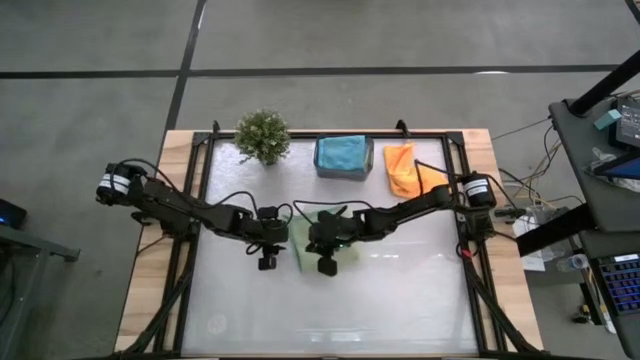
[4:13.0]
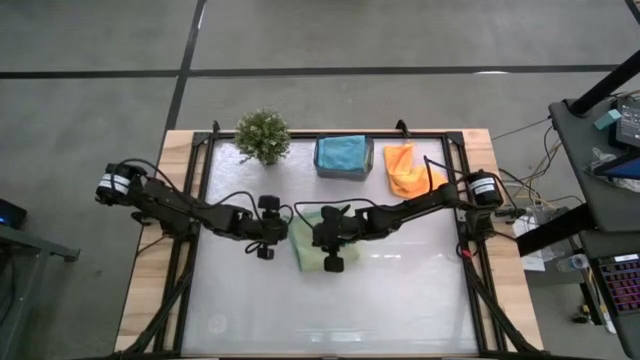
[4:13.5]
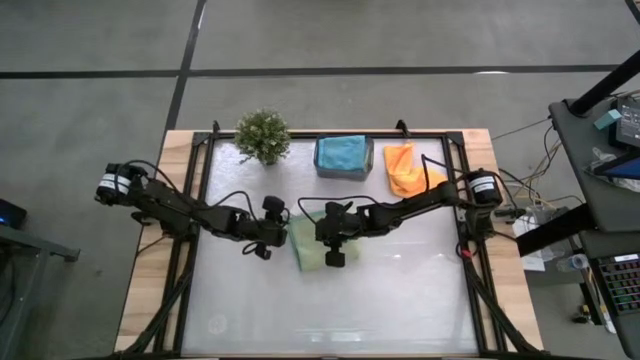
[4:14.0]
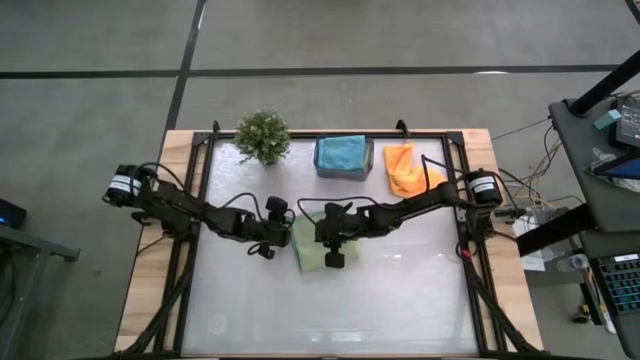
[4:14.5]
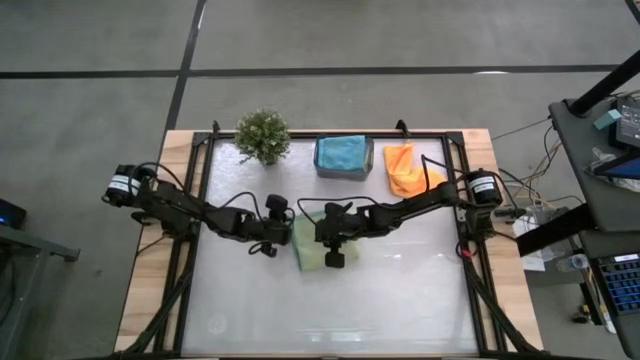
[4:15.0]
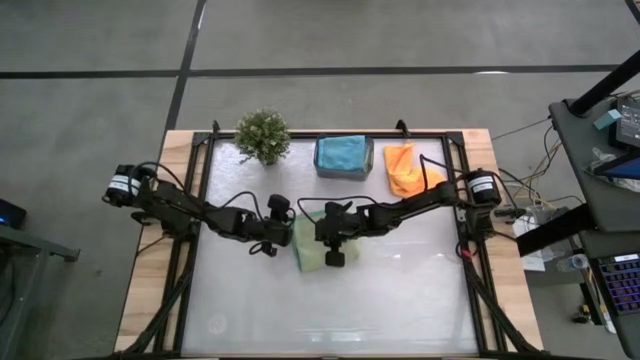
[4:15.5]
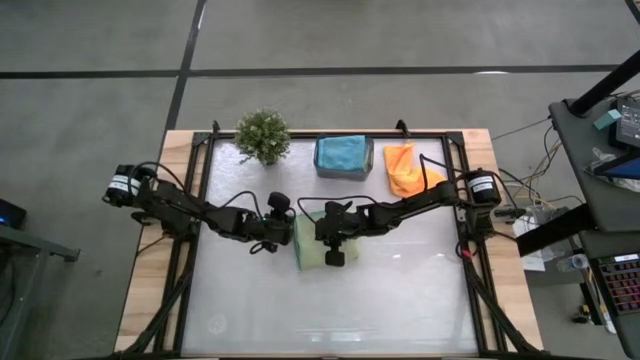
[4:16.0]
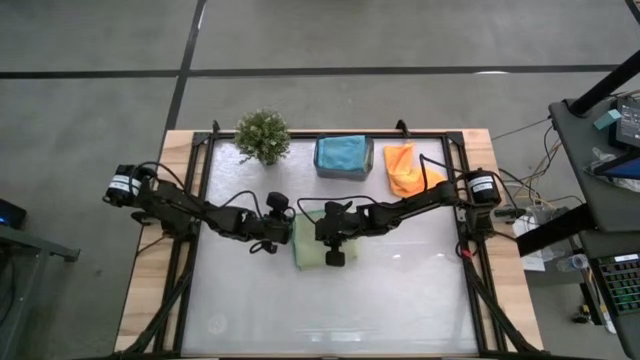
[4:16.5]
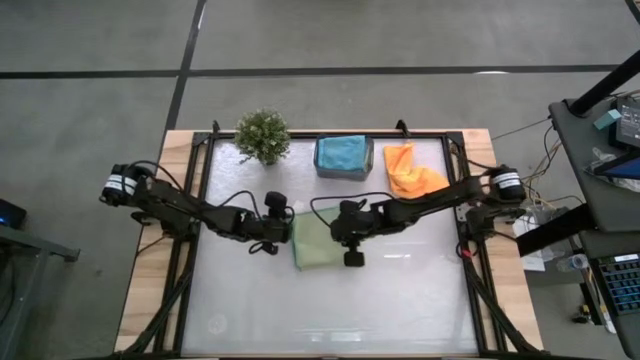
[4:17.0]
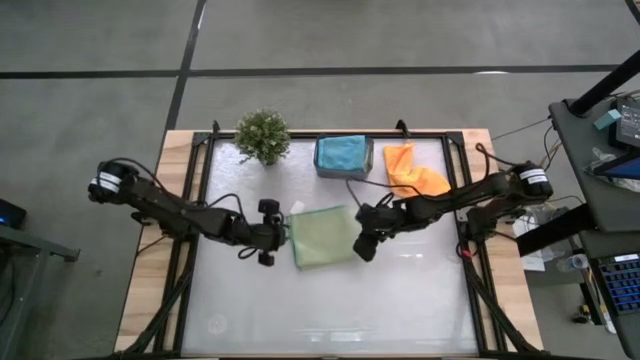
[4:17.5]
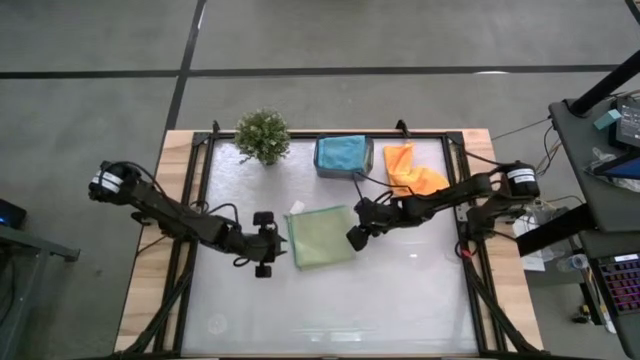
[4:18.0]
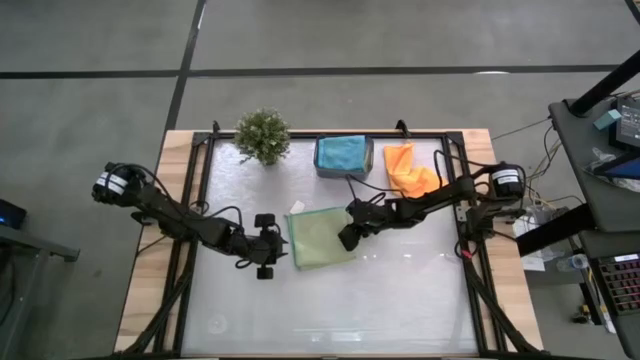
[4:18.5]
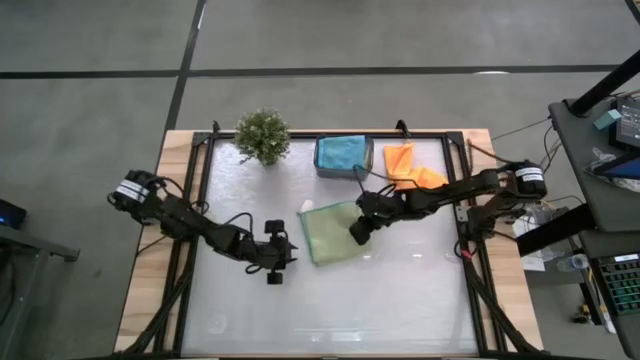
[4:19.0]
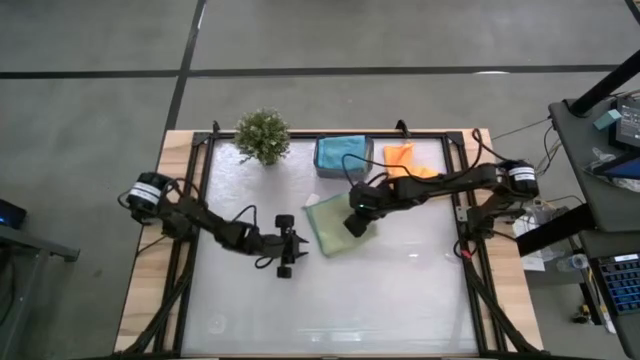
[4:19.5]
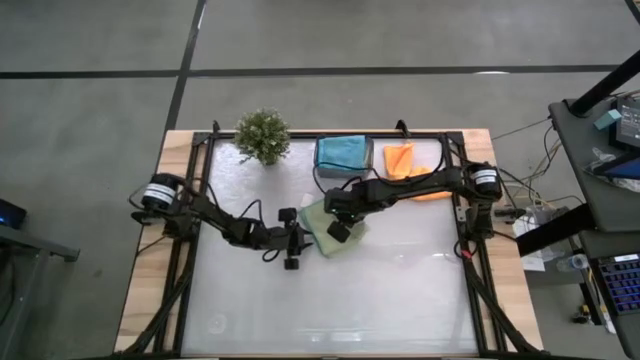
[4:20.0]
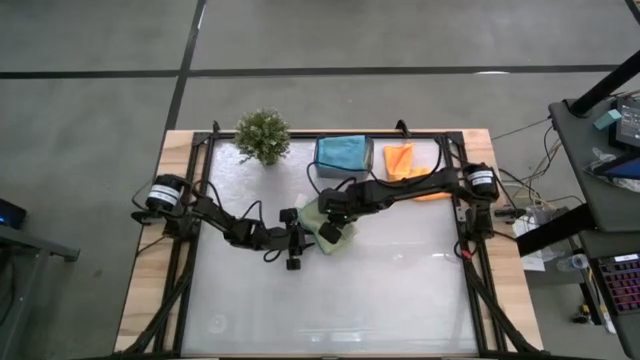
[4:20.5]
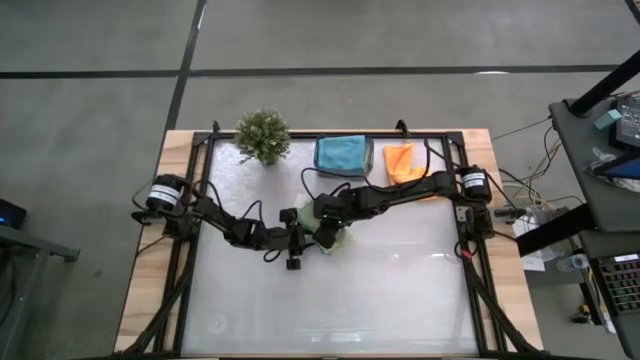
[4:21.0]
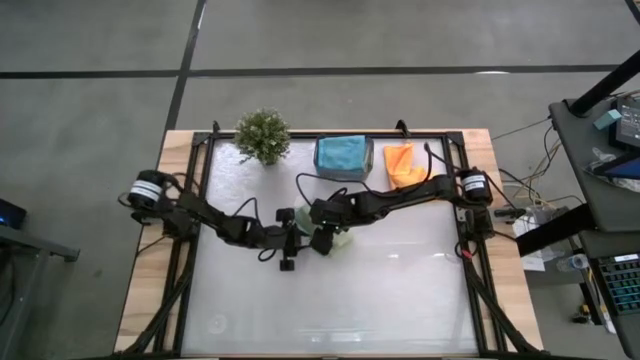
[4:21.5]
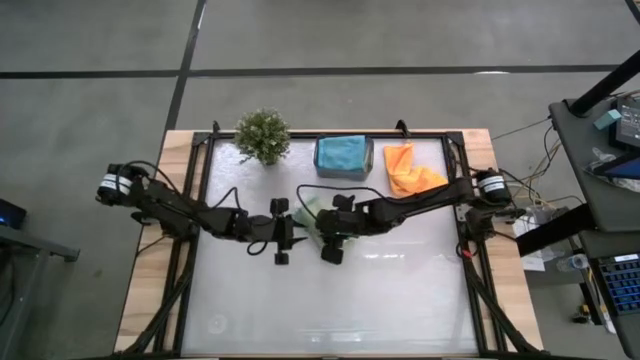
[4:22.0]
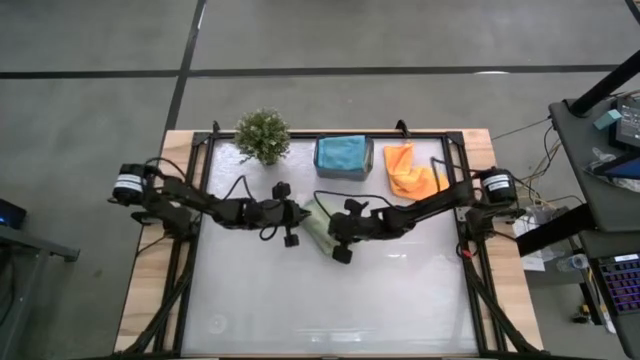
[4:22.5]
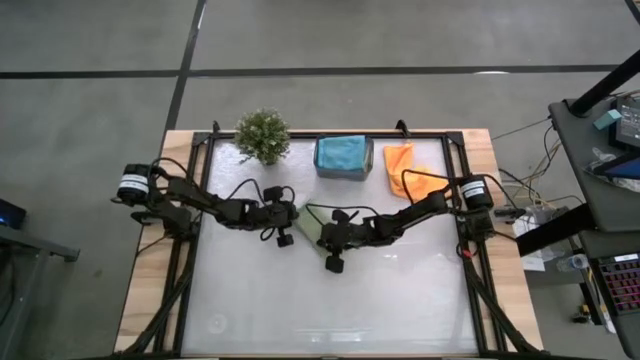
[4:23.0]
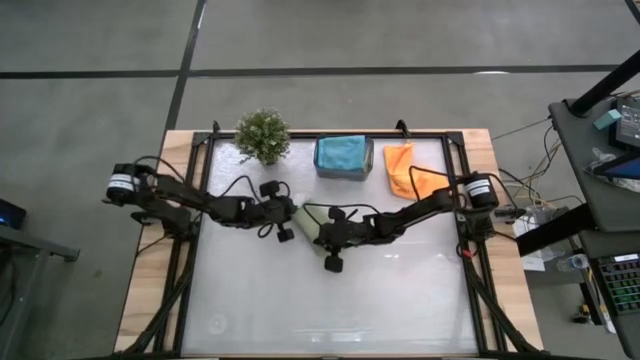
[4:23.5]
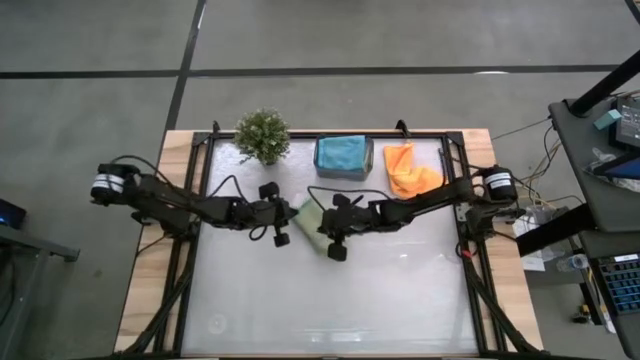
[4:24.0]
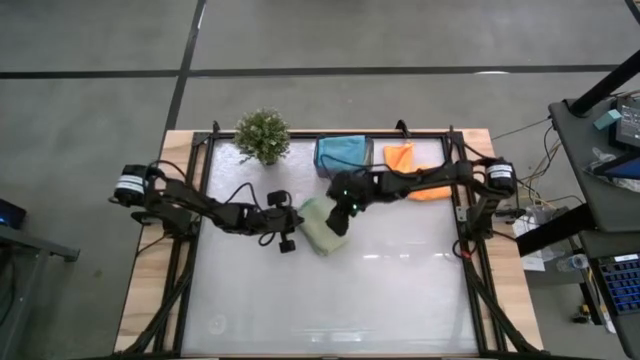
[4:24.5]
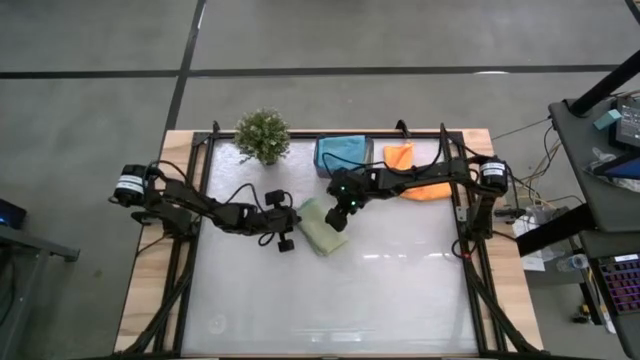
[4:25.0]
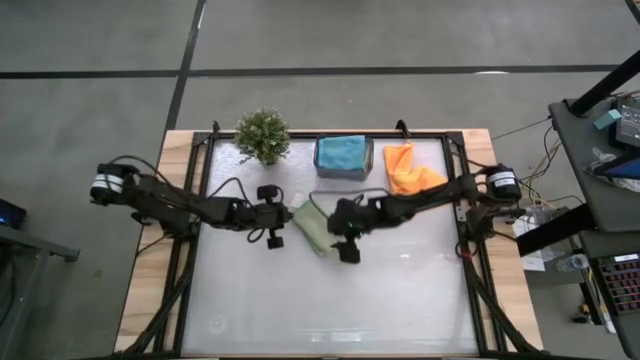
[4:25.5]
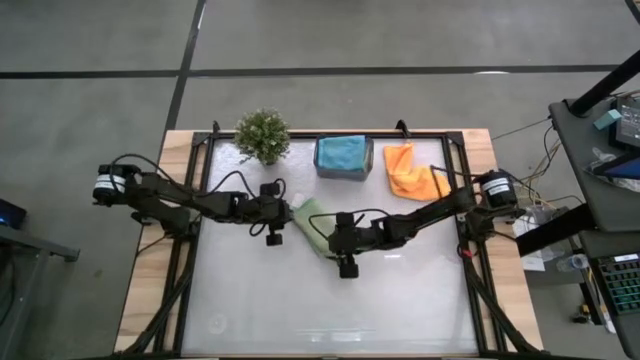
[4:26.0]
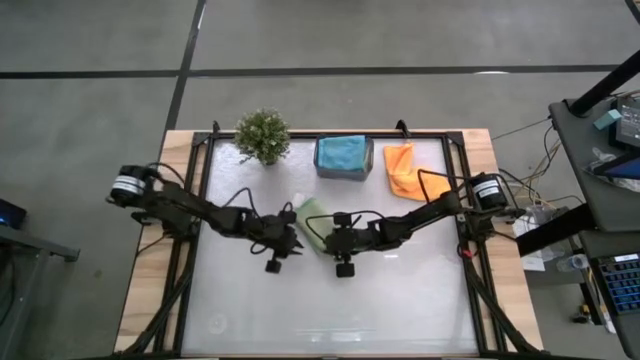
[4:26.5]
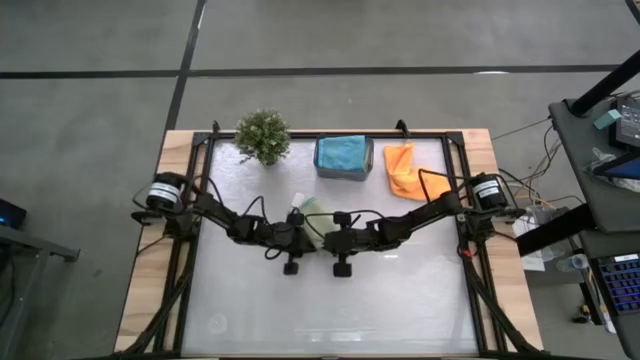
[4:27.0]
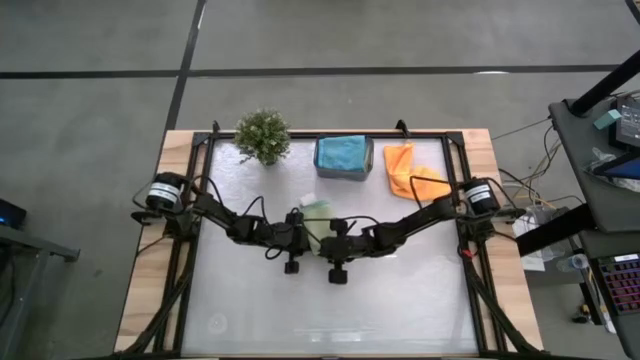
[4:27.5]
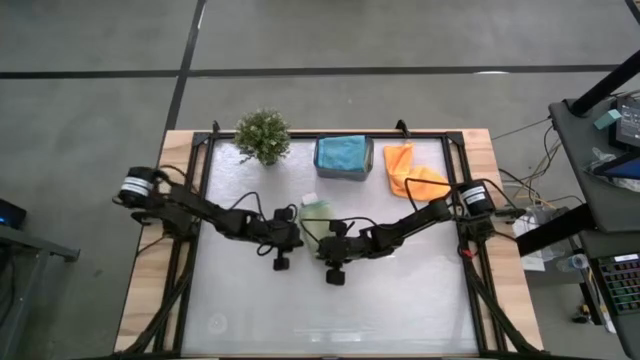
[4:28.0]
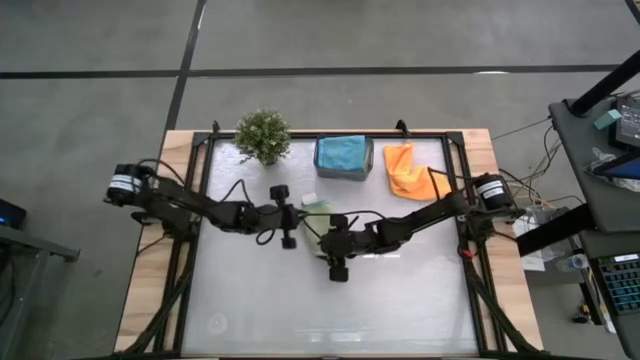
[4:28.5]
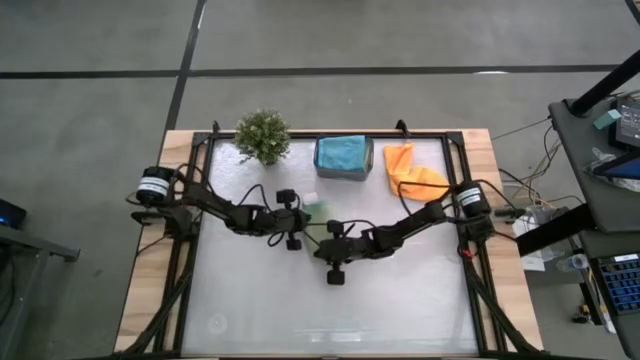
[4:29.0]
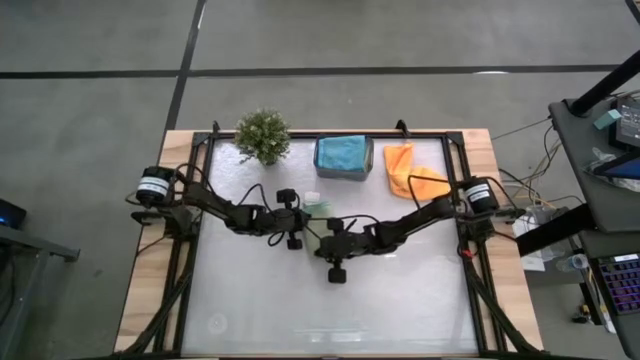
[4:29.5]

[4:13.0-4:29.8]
Task: Fold microfiber towels
Fold the green towel

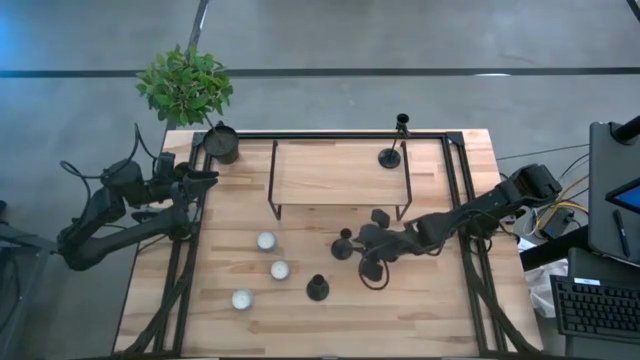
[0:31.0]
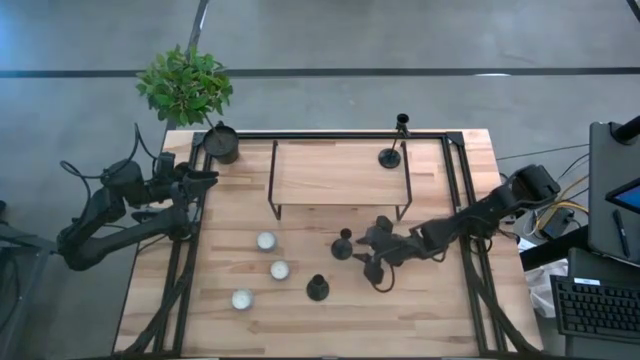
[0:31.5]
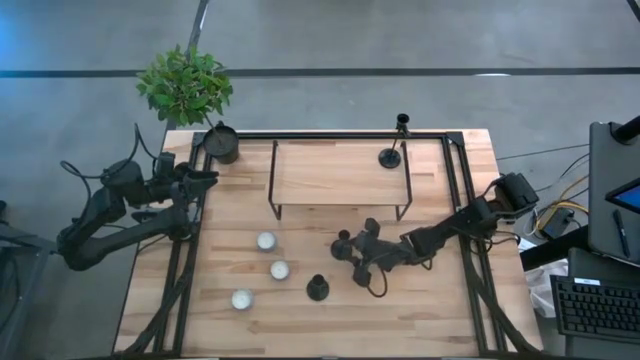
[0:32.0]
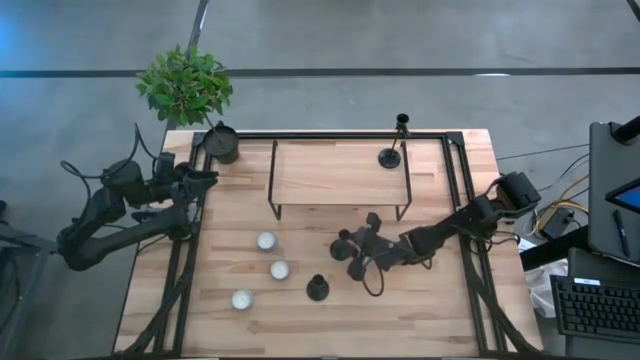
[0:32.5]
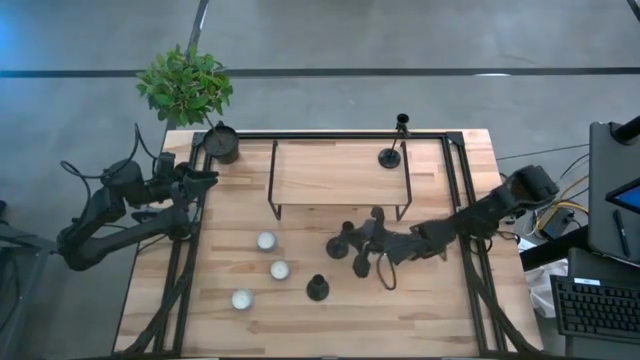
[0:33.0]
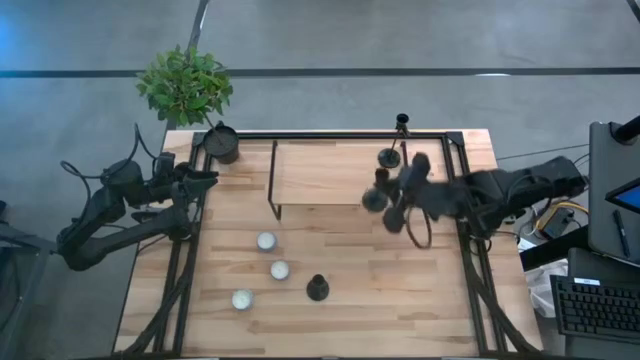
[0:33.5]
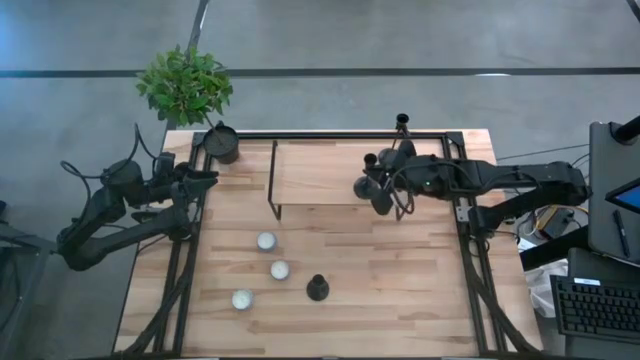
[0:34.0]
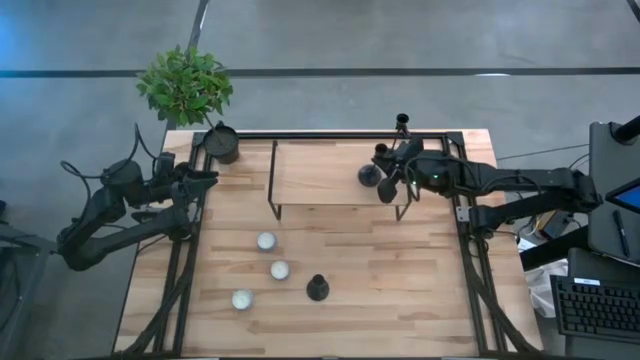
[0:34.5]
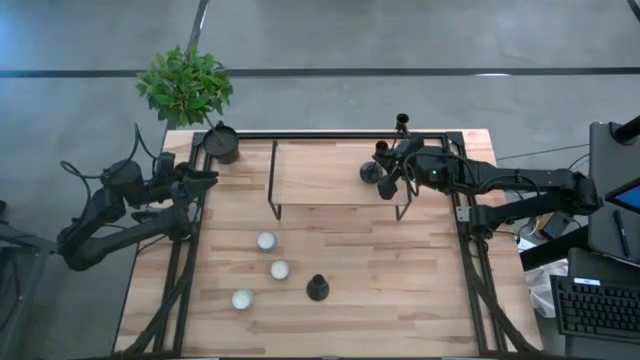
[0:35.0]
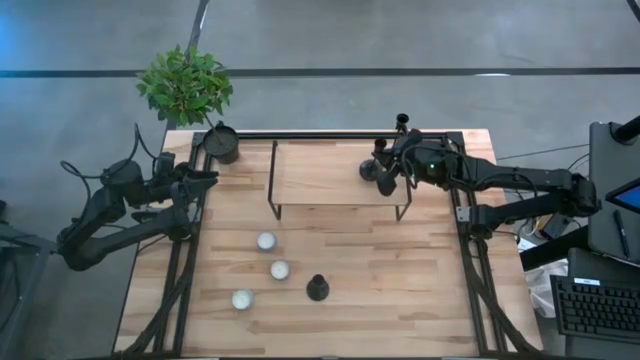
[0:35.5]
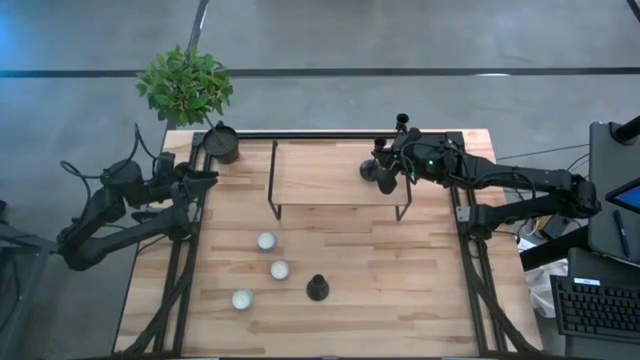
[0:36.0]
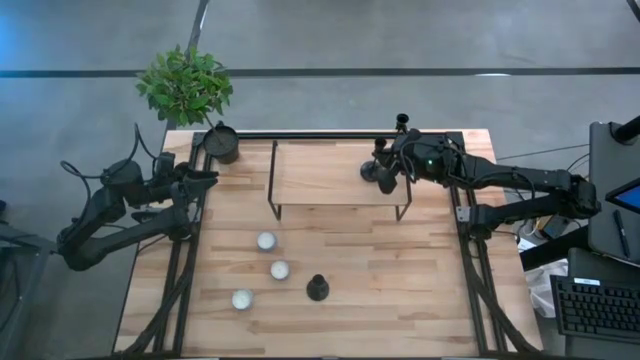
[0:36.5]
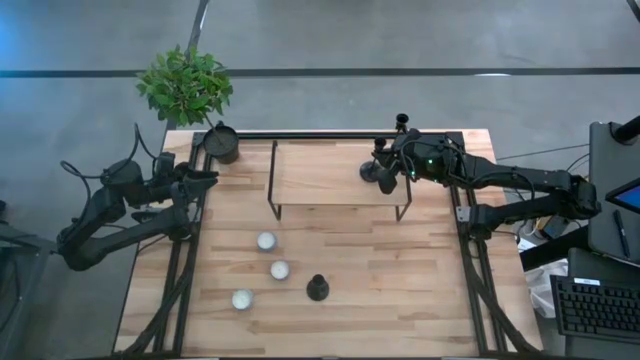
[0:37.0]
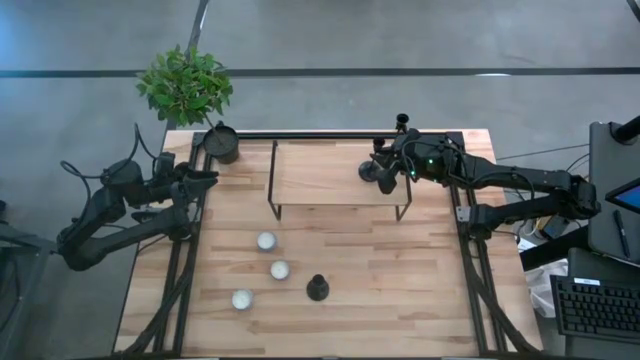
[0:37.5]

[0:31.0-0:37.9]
Task: Pick & Place candle stick holders
Put the top black candle holder on the shelf
